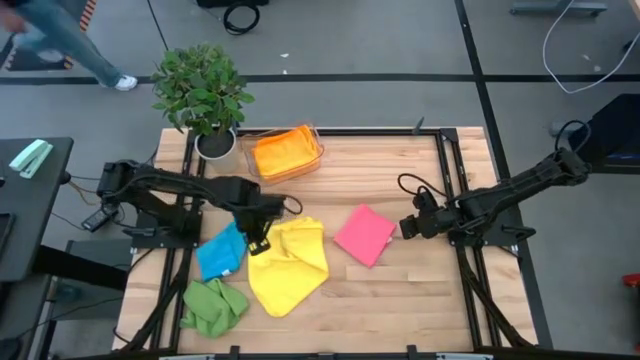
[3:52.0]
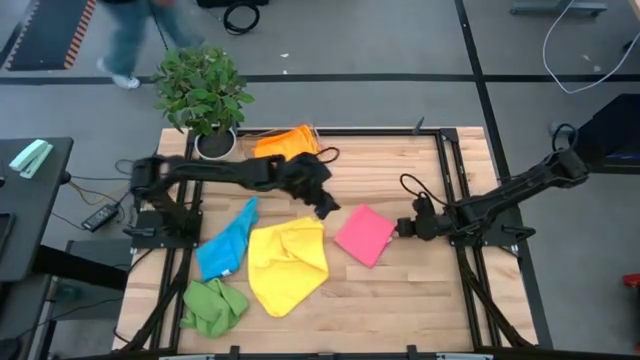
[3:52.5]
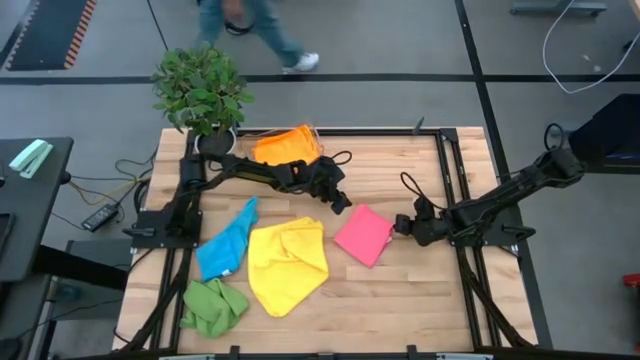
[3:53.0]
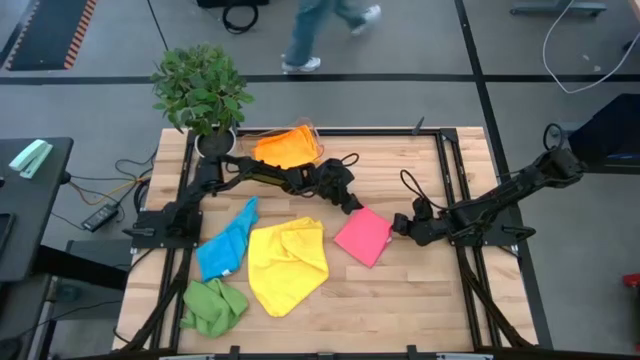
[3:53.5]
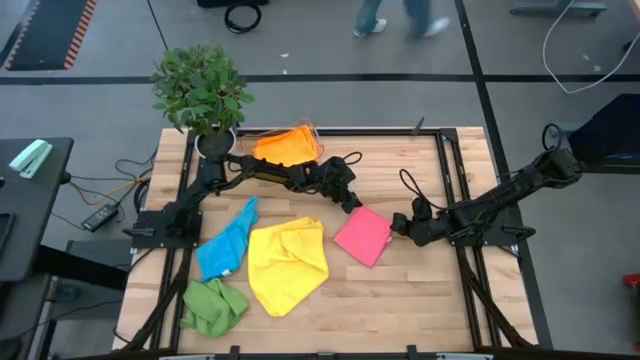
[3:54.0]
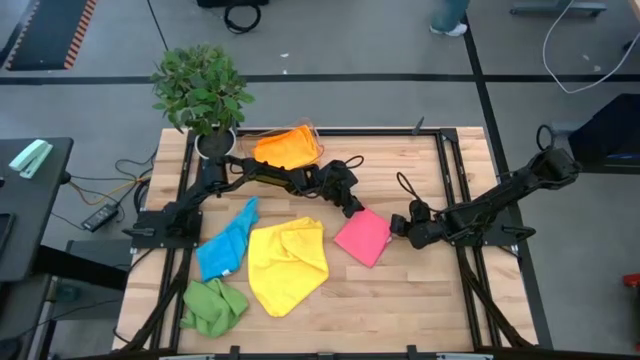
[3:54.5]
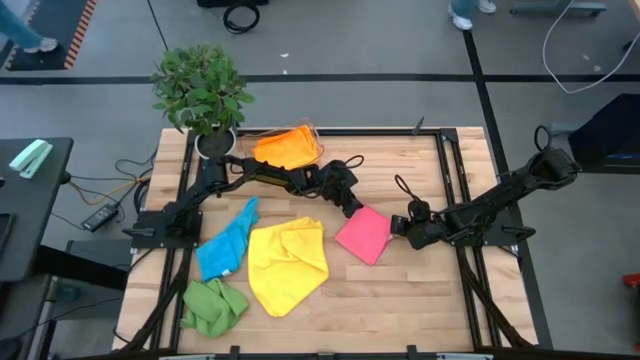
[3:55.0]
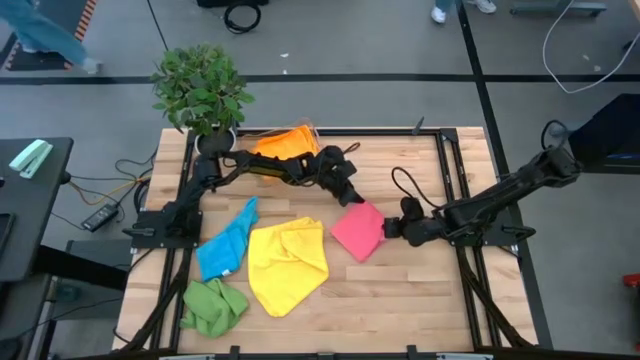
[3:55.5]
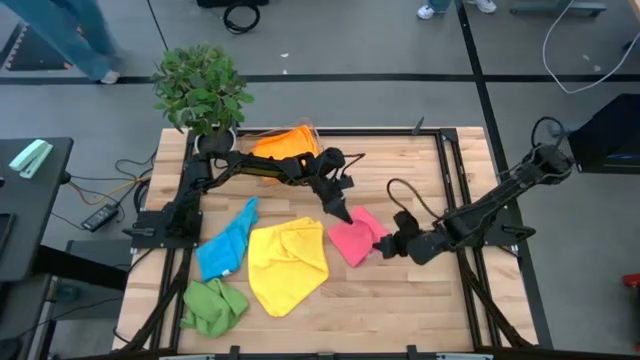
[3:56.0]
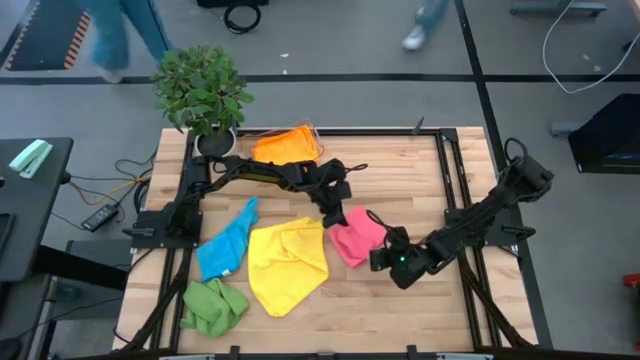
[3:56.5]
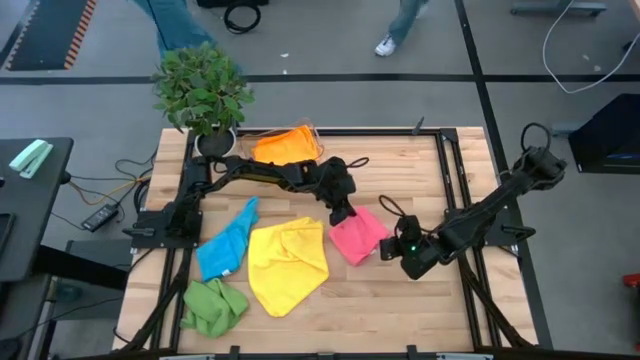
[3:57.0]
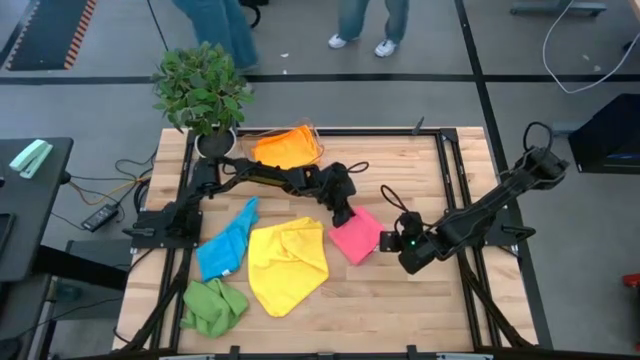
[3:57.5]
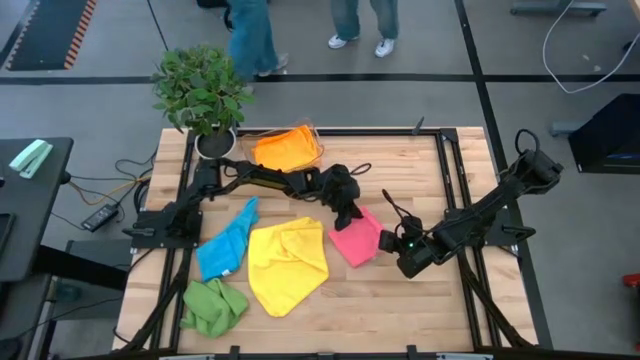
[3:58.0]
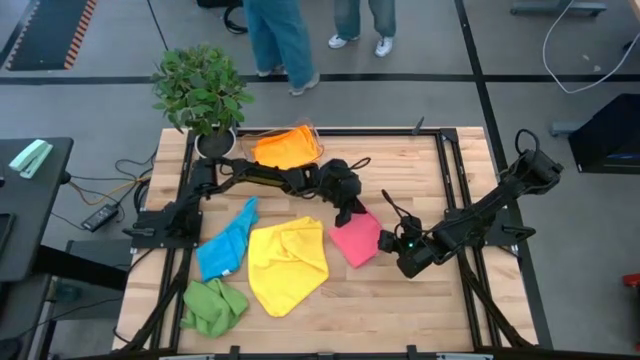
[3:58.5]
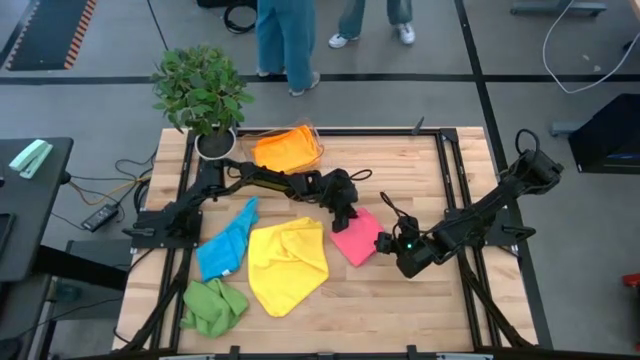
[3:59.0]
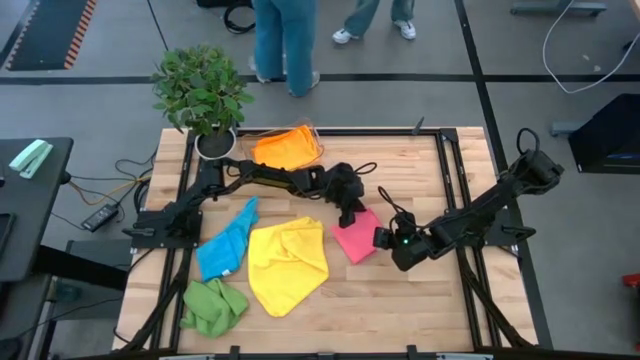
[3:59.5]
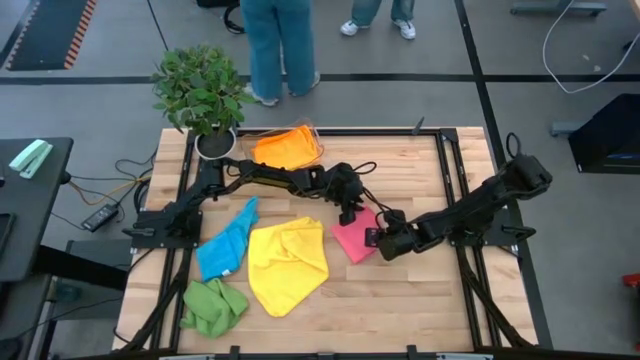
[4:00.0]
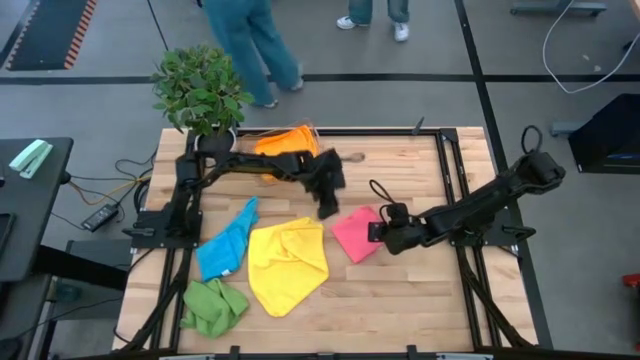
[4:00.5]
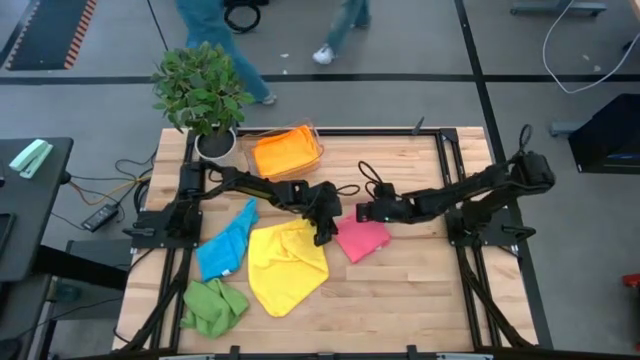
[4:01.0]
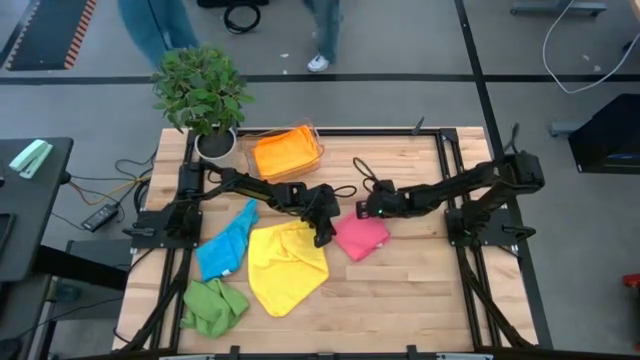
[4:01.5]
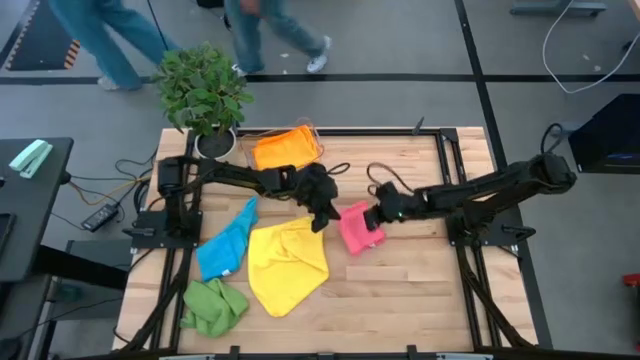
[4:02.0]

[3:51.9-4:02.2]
Task: Fold microfiber towels
Stack the folded pink microfiber cloth on top of the orange microfiber cloths in the transparent bin

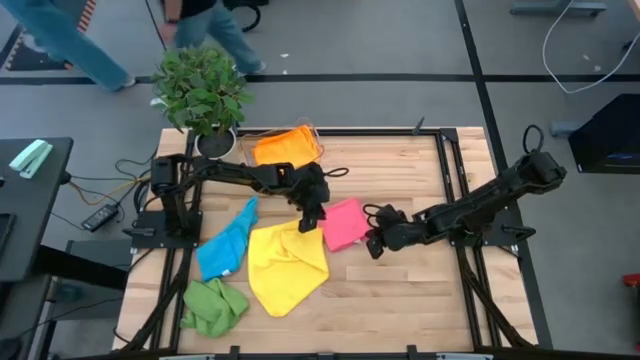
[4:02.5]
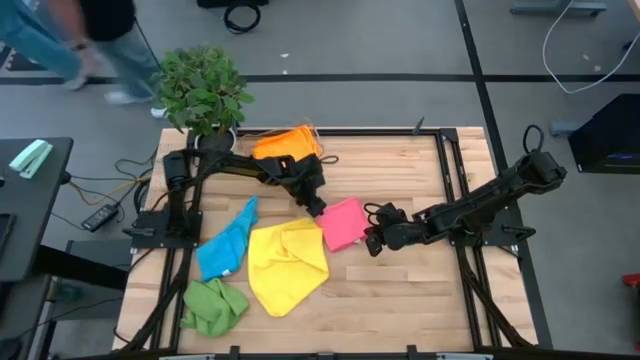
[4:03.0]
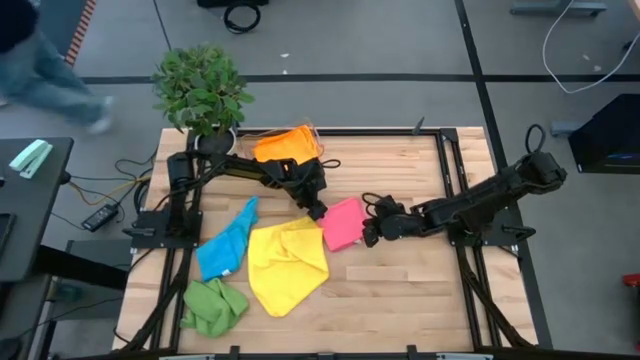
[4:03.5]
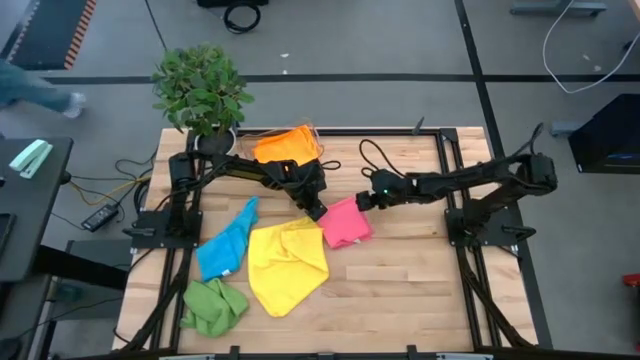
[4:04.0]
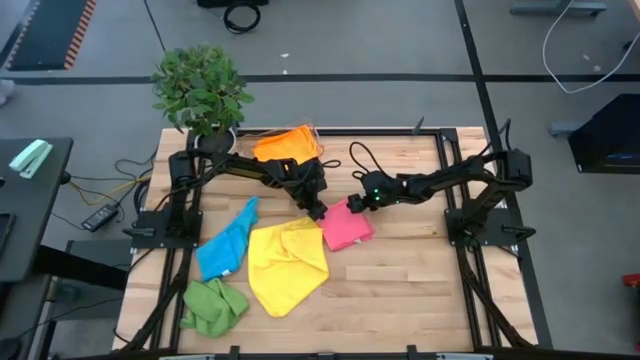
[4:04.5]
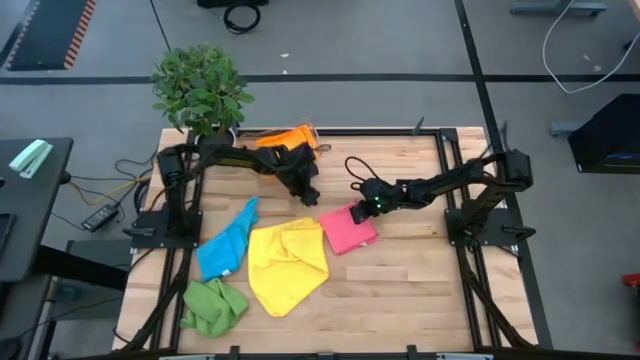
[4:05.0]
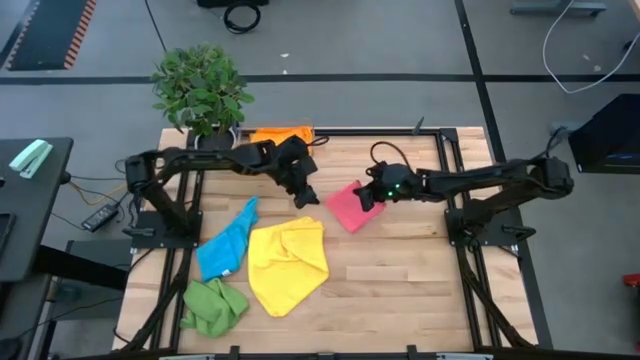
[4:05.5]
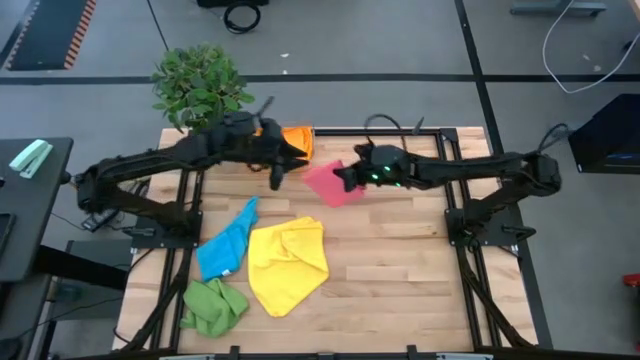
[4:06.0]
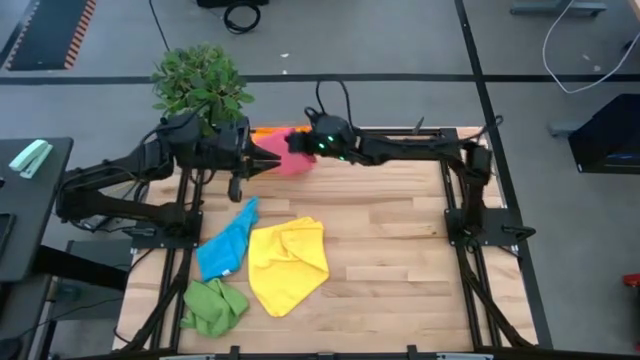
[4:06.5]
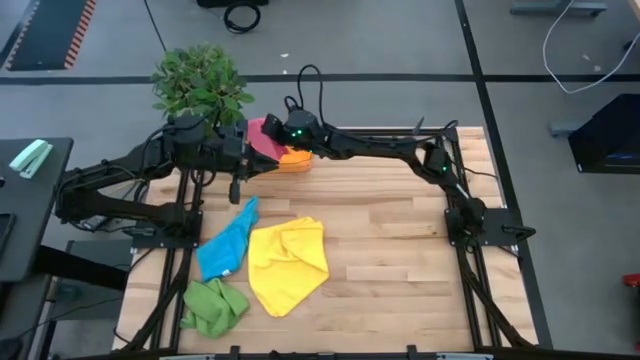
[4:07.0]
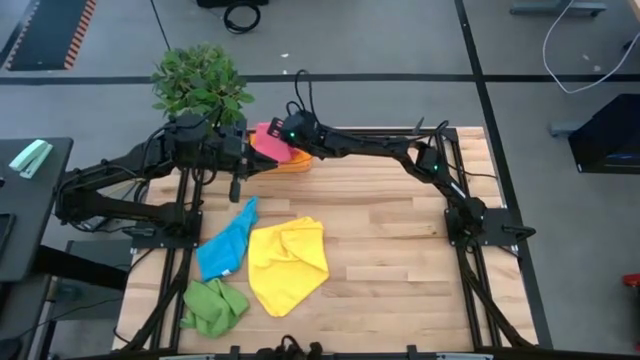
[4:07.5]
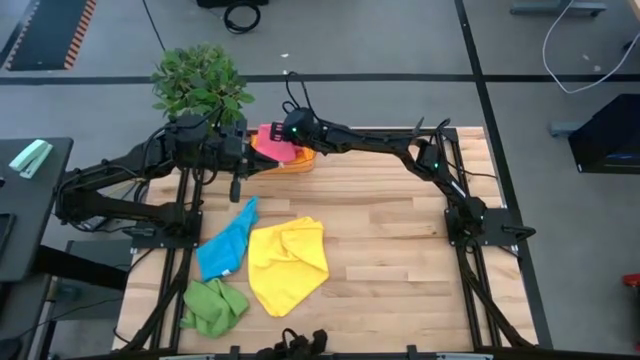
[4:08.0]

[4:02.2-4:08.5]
Stack the folded pink microfiber cloth on top of the orange microfiber cloths in the transparent bin

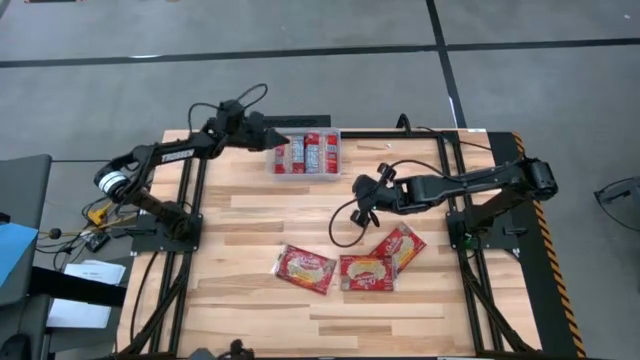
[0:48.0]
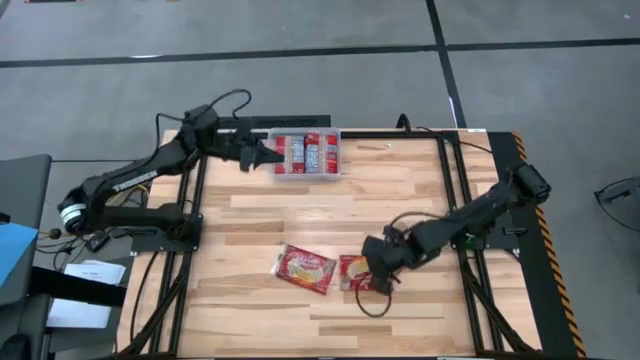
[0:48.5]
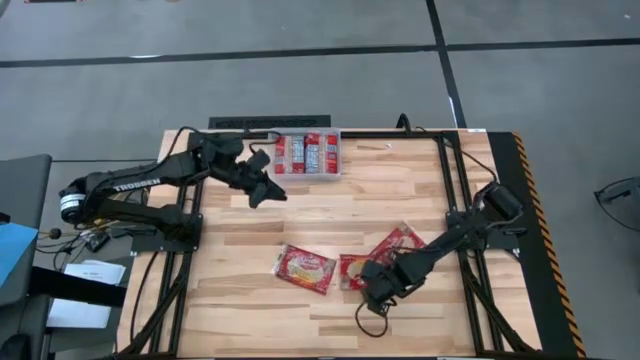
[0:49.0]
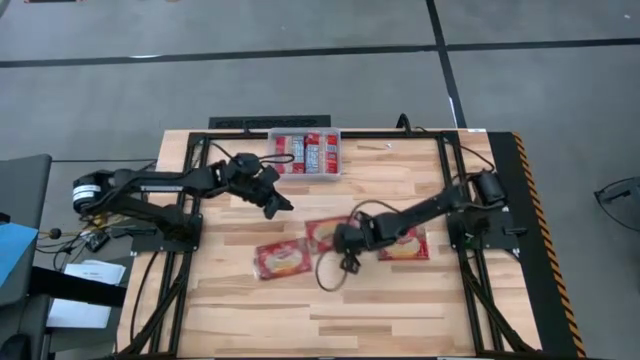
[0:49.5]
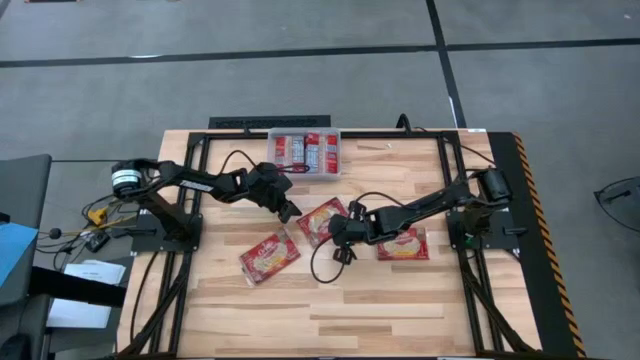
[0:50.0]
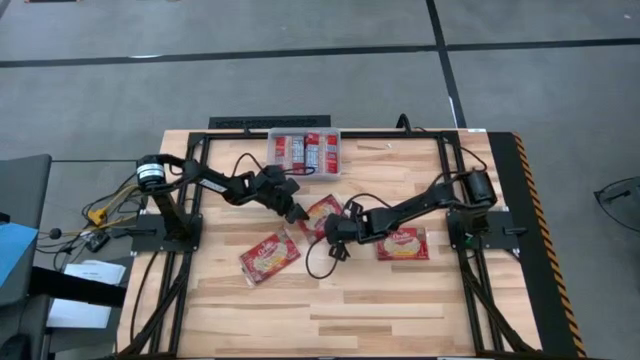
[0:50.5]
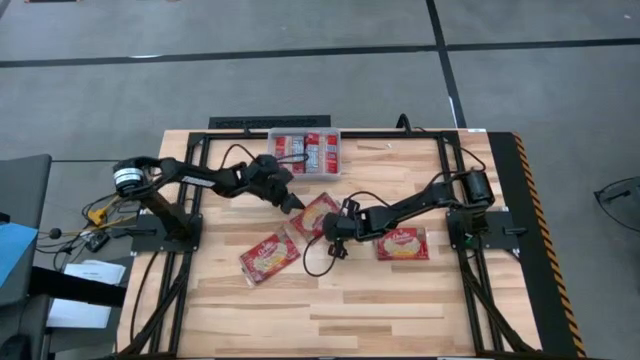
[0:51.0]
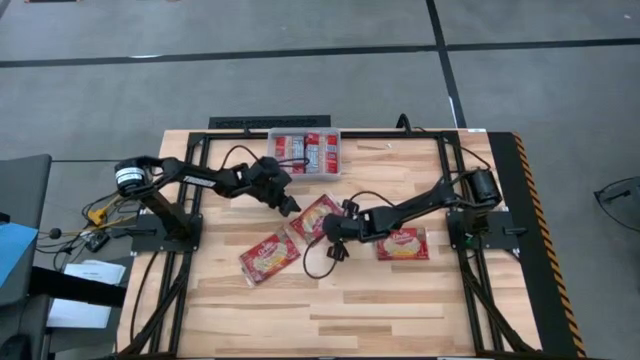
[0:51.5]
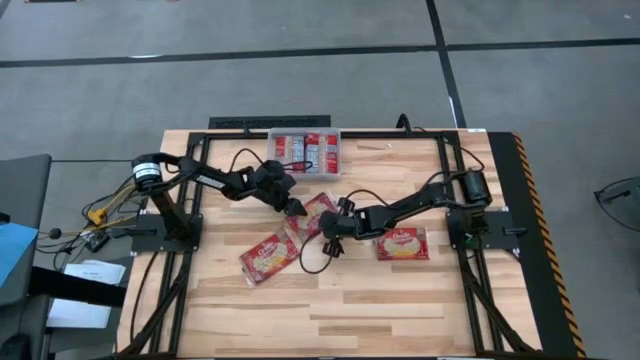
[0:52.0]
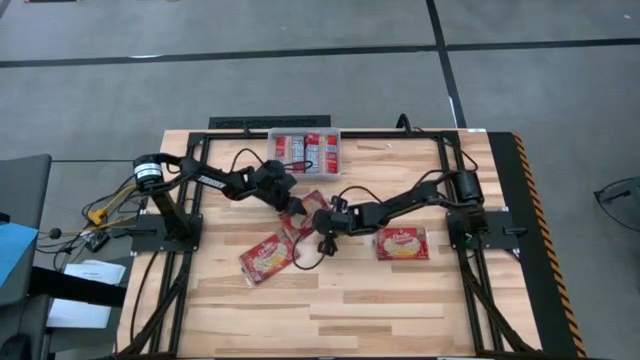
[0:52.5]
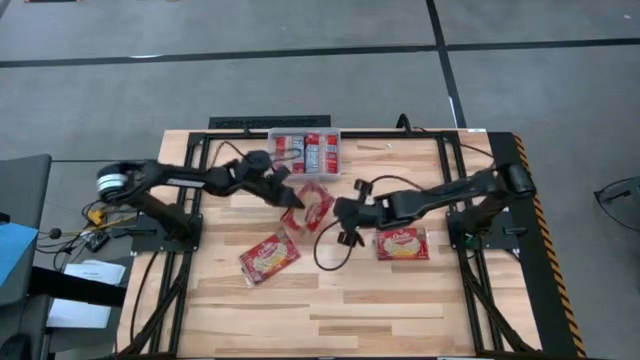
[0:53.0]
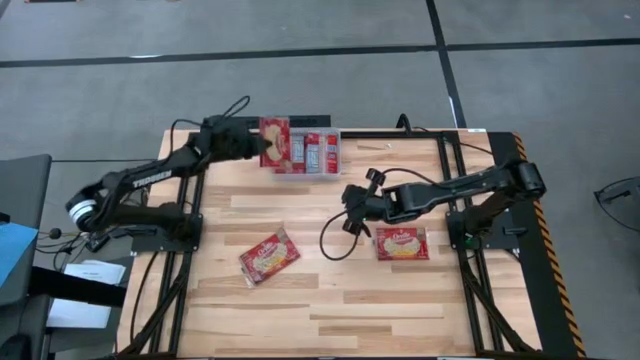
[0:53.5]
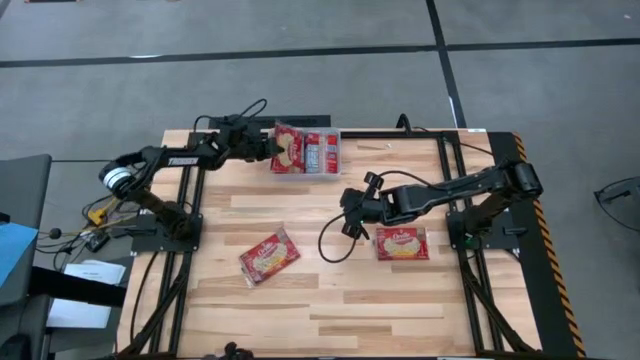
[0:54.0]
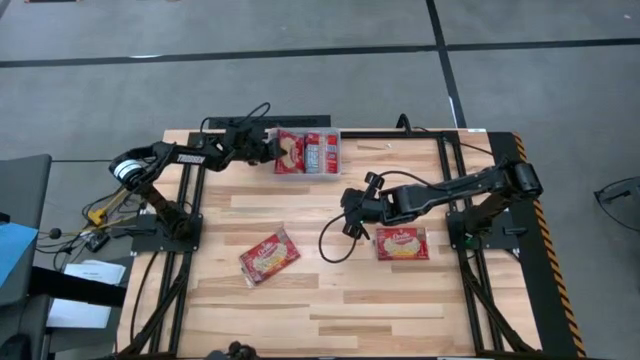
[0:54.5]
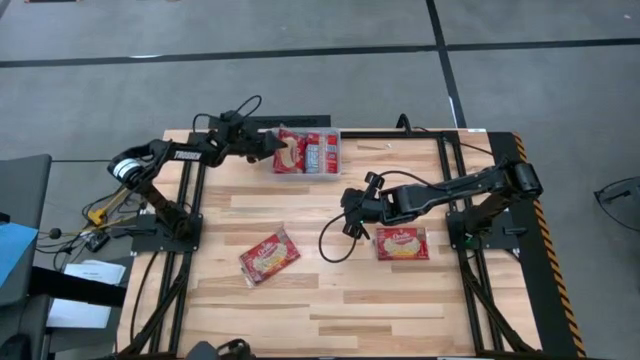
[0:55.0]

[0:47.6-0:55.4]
Task: Sort popcorn bags into baskets
Put the red popcorn bag into the transparent bin
